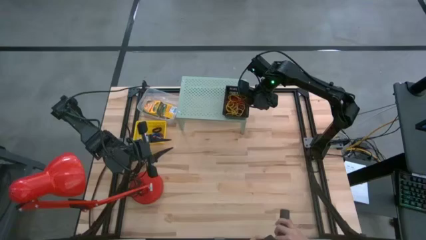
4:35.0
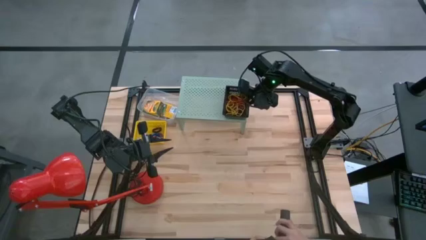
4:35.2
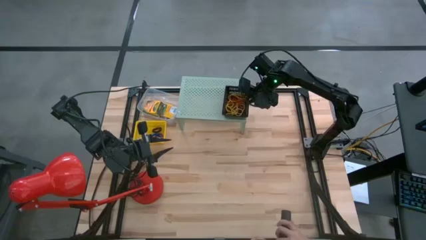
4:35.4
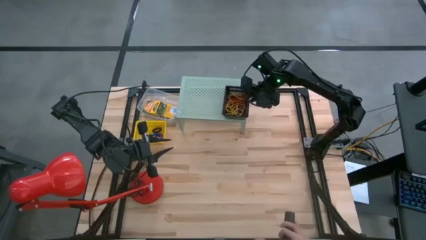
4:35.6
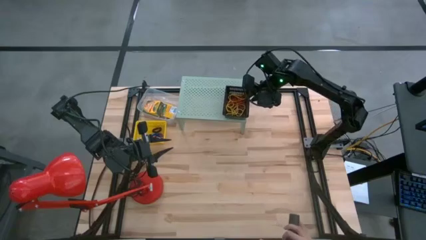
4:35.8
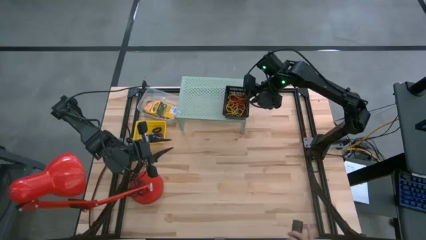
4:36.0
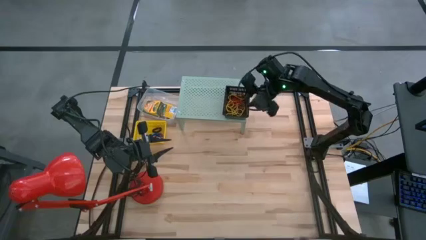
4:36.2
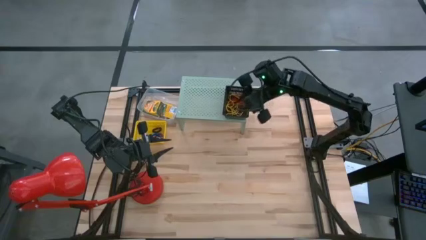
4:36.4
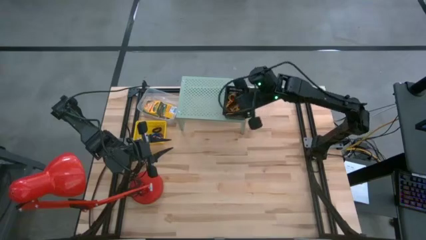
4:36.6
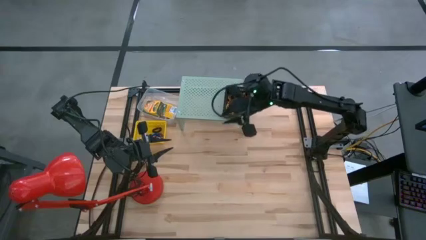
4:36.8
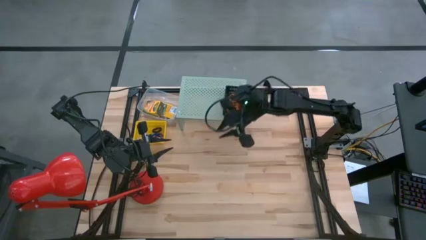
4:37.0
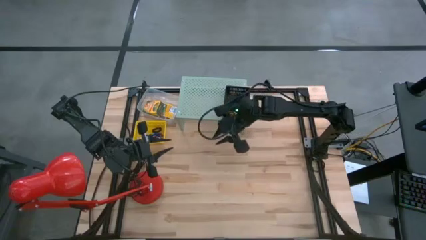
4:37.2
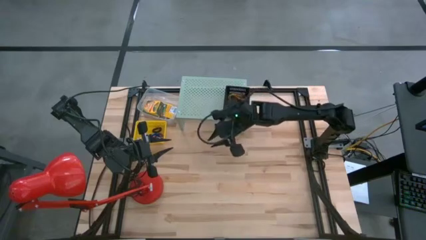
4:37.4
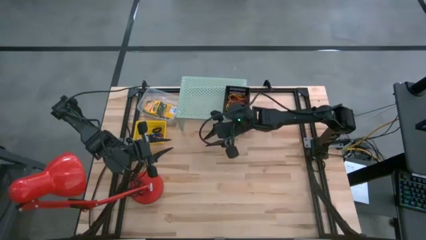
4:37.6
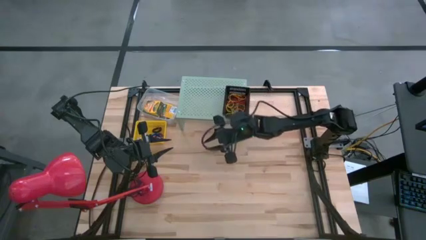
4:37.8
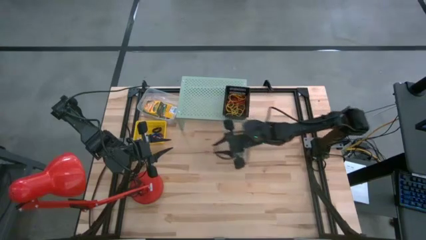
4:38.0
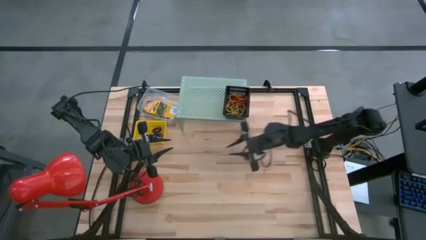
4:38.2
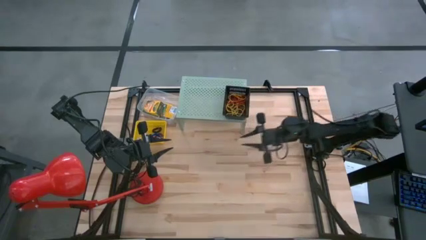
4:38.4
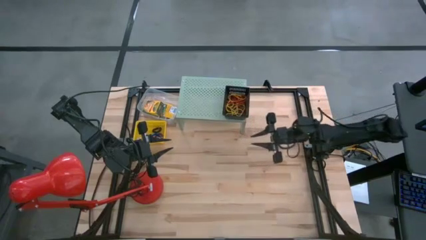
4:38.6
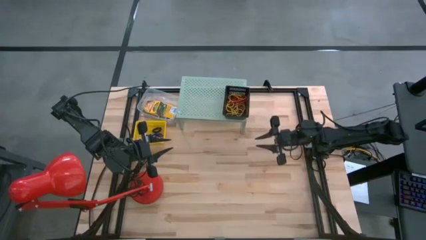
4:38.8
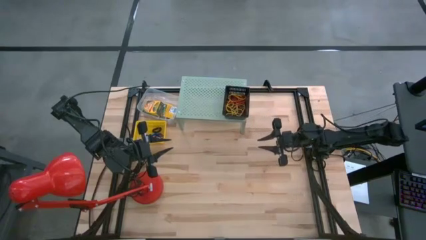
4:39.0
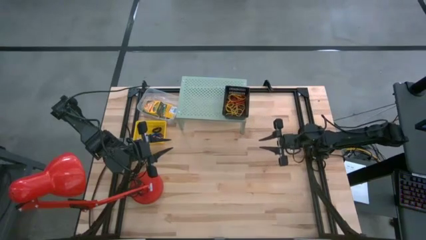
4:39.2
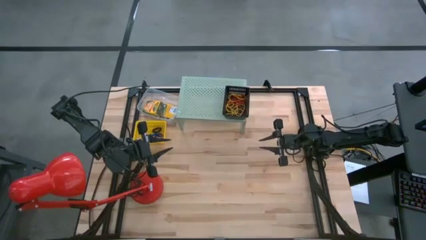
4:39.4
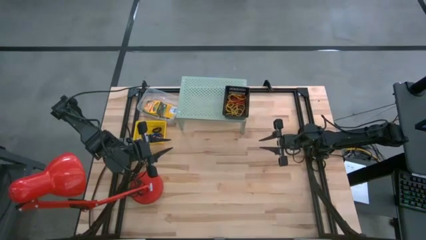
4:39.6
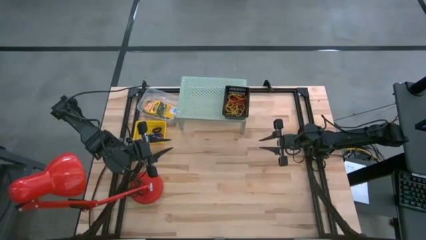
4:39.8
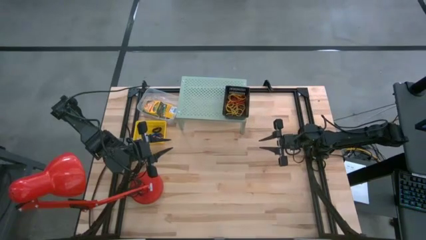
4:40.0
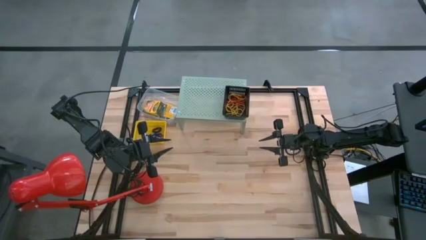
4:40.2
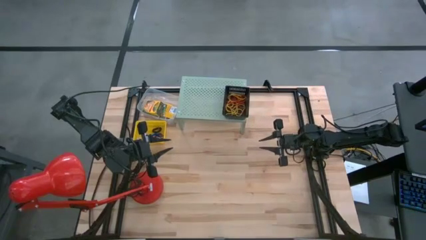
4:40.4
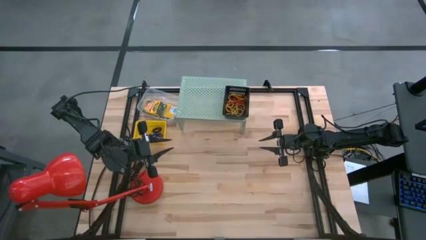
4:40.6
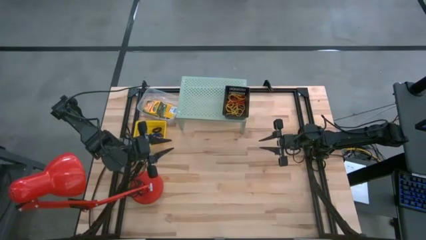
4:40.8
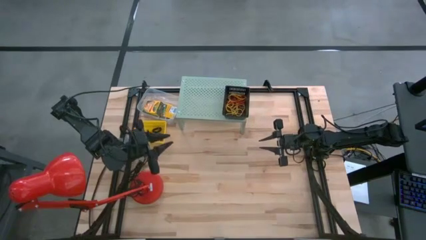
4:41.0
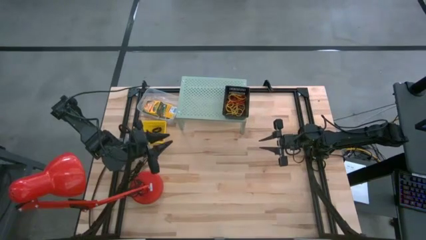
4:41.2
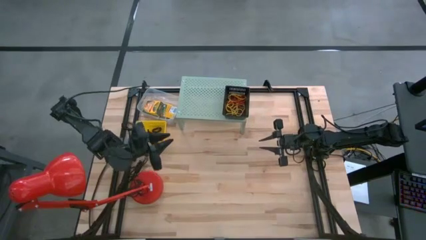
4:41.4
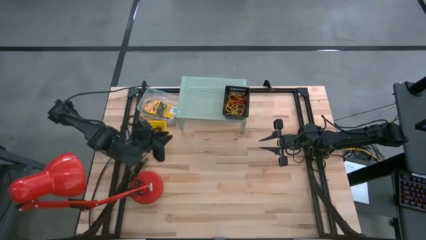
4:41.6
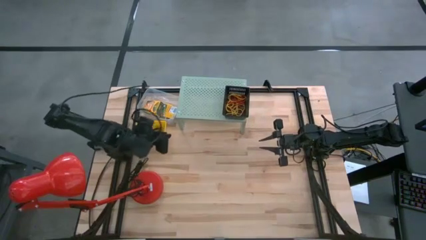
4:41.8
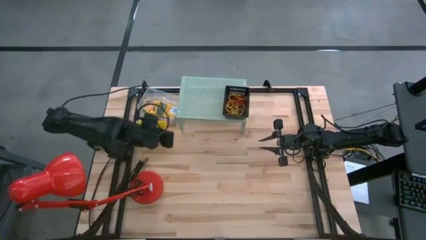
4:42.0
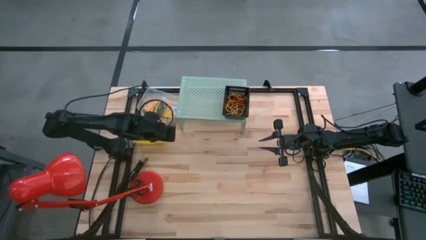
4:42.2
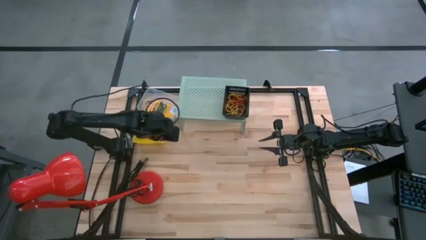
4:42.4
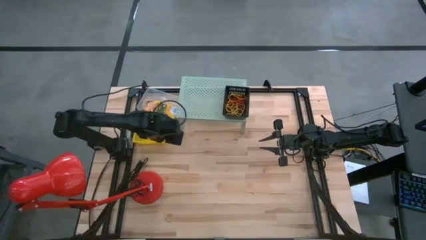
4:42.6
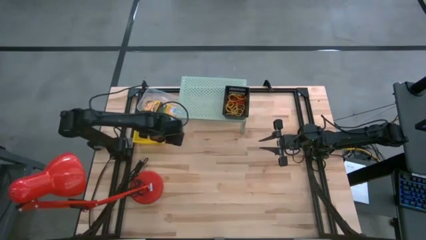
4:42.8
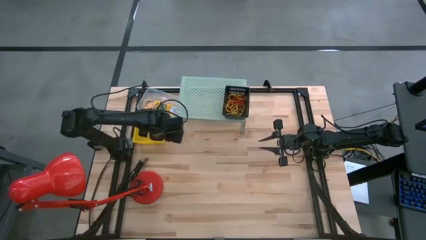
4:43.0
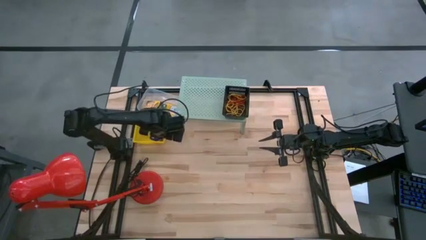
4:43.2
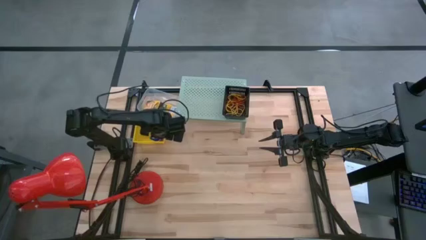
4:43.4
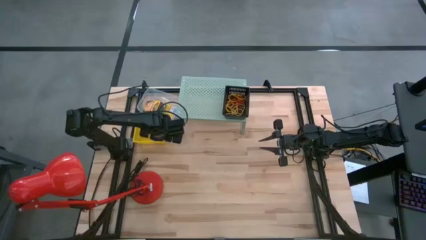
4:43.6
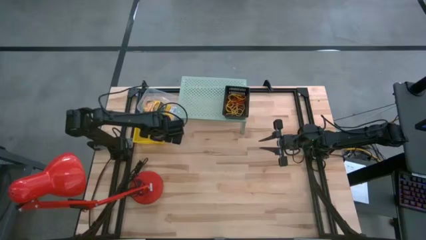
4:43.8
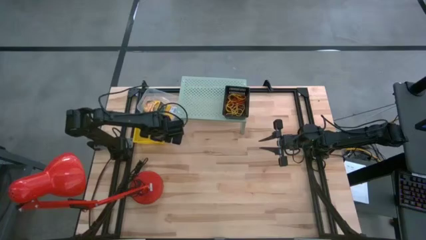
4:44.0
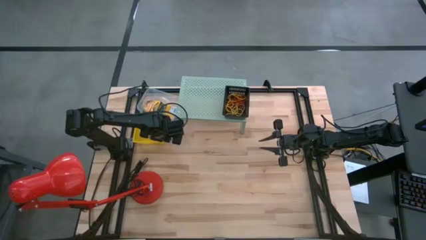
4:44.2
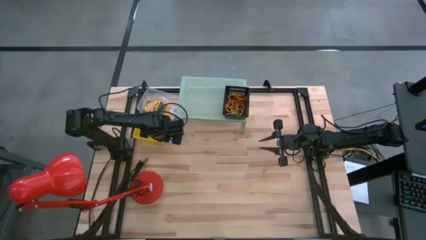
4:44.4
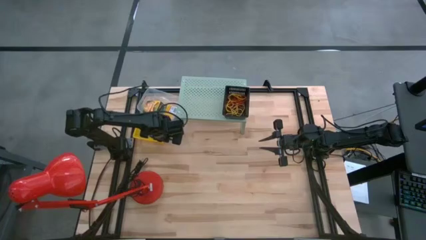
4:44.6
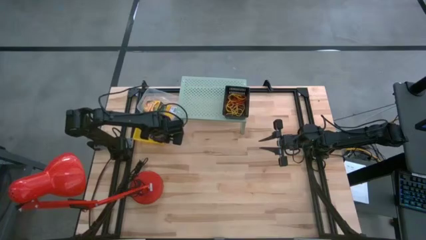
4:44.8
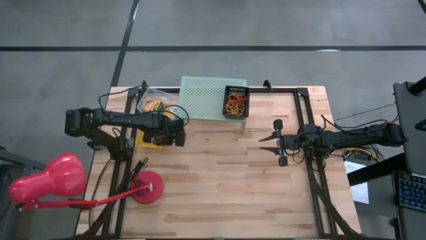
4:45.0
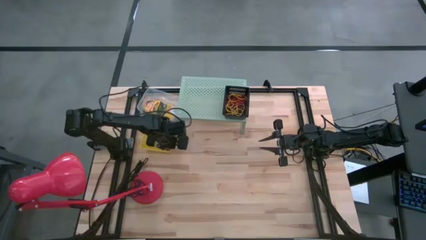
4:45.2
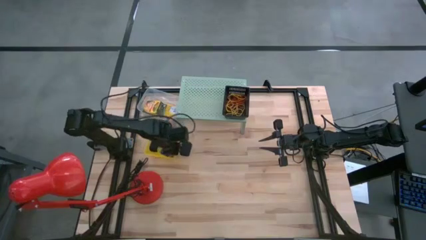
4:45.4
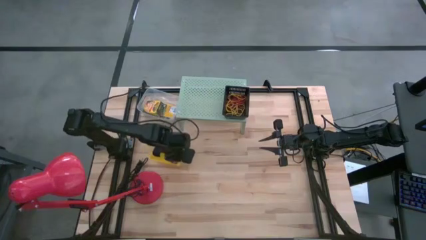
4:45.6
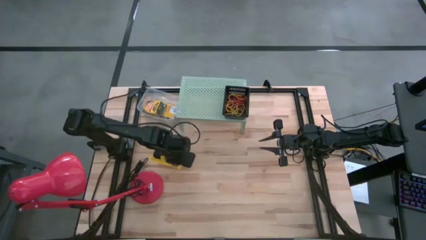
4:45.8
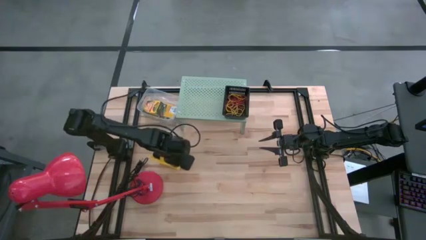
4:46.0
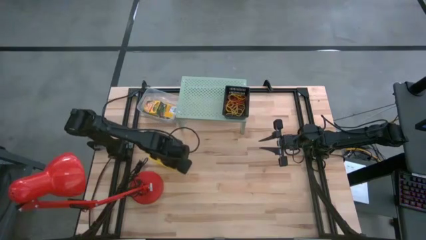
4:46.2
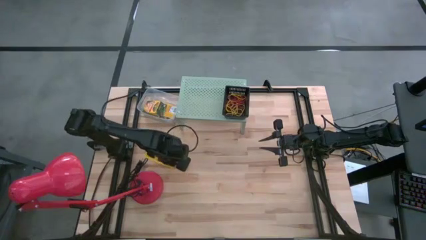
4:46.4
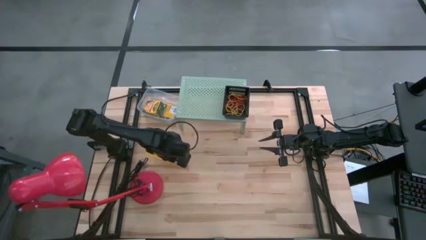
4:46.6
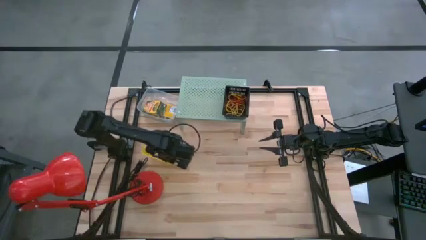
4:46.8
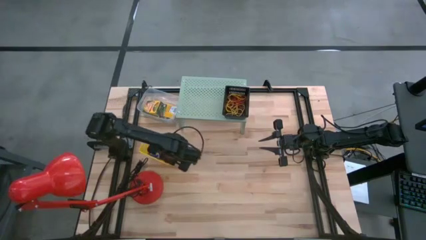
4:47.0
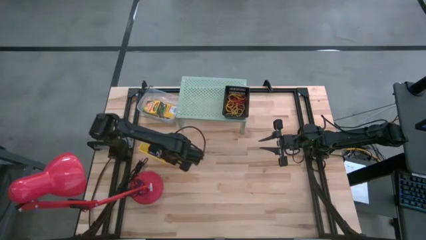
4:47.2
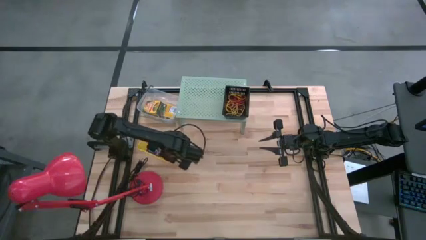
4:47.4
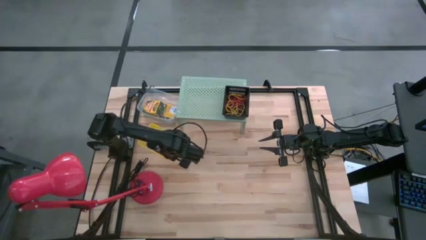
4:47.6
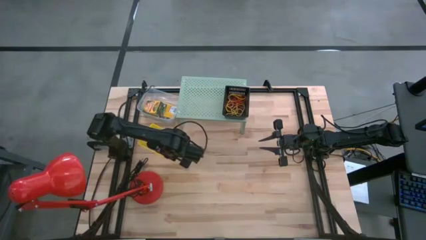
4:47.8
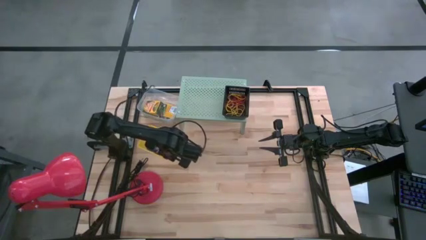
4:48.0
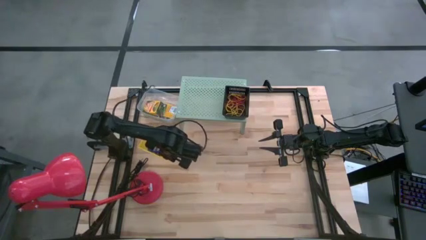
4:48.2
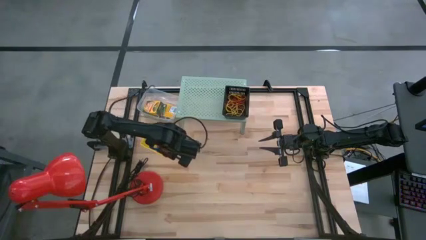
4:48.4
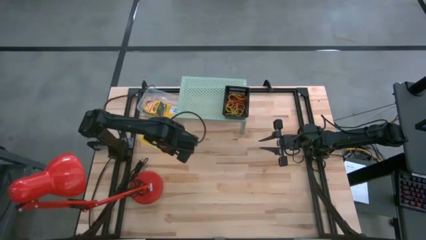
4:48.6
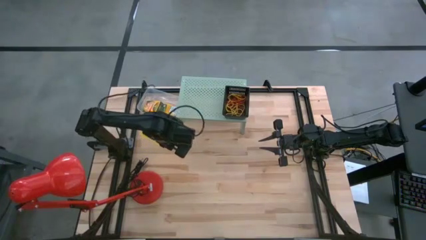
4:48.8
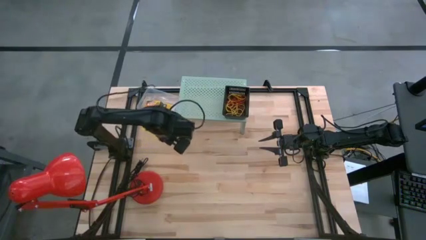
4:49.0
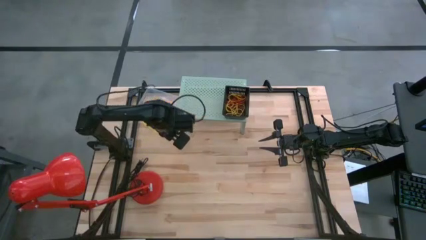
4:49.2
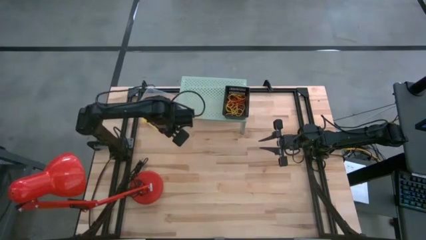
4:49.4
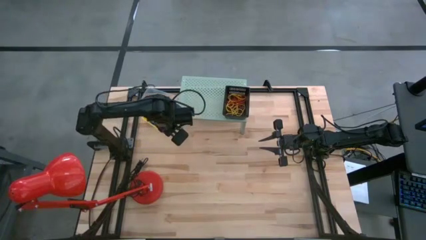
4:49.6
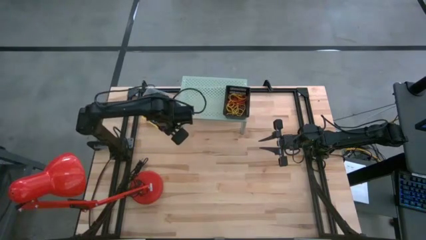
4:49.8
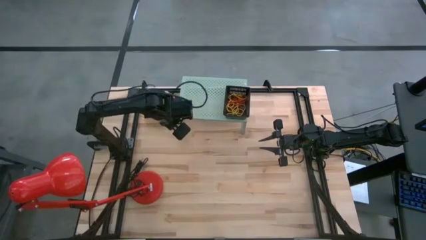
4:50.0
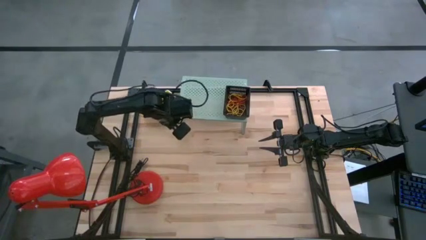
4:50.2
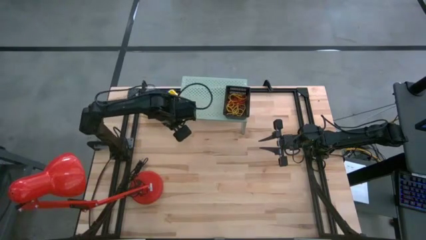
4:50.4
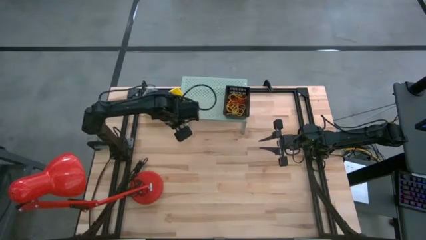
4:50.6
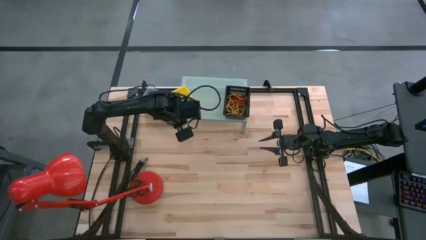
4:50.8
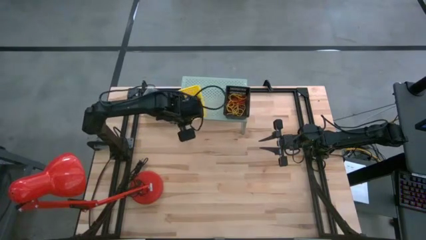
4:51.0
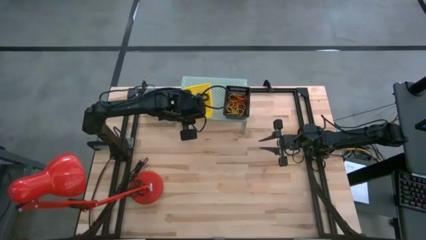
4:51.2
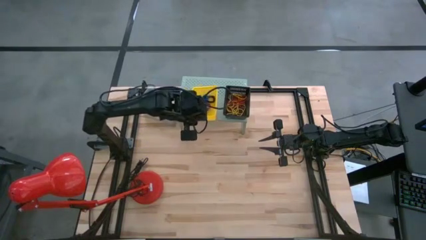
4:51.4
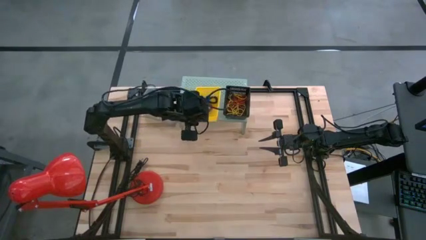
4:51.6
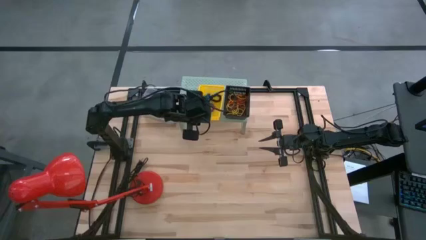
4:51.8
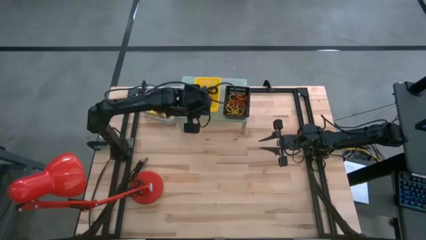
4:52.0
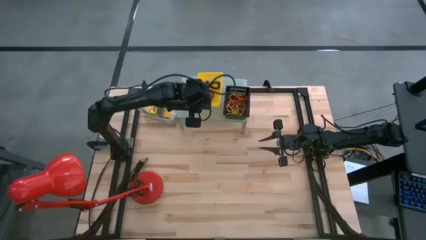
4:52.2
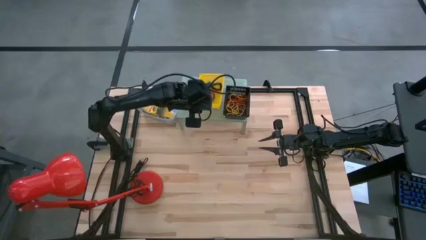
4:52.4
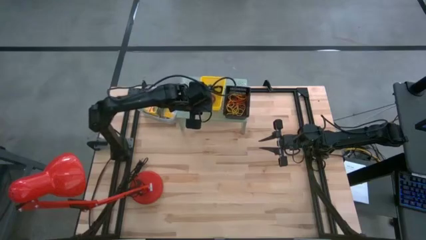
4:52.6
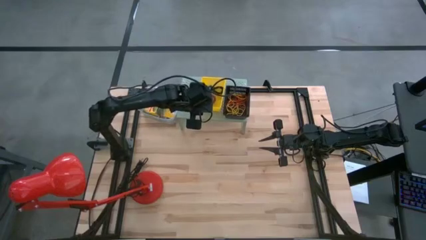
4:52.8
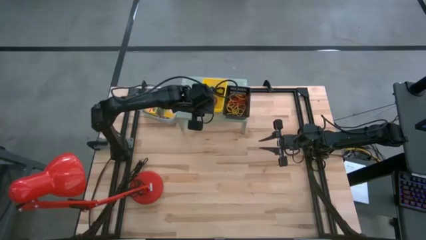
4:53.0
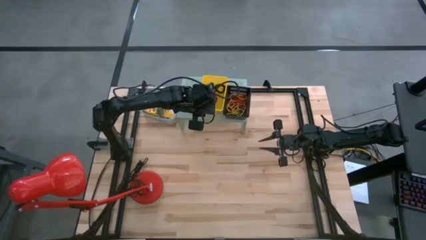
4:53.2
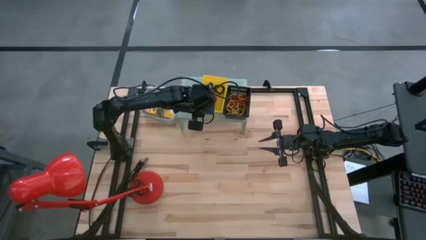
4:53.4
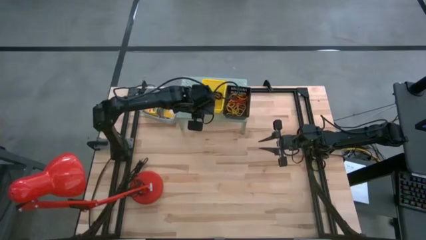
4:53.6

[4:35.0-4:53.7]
Task: Pick & Place Office Desk Supplies
Put the yellow bin on the shelf
